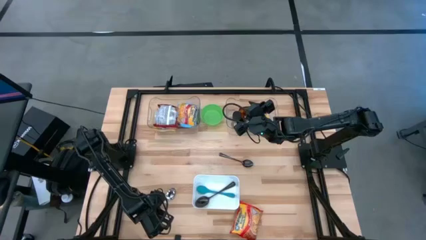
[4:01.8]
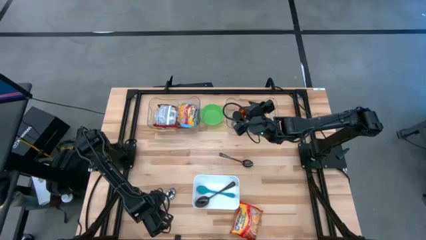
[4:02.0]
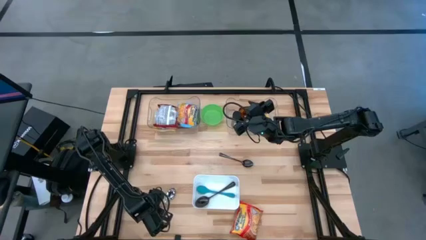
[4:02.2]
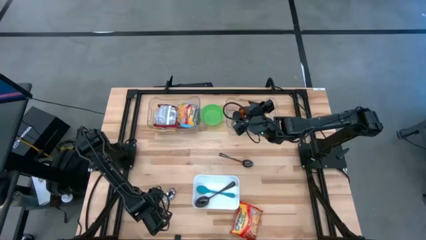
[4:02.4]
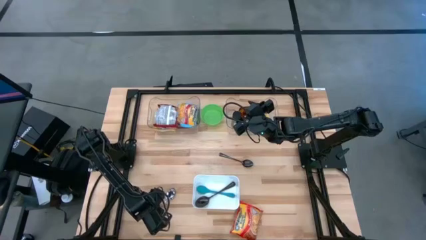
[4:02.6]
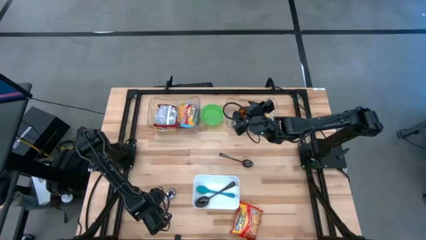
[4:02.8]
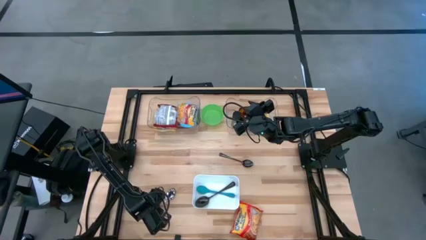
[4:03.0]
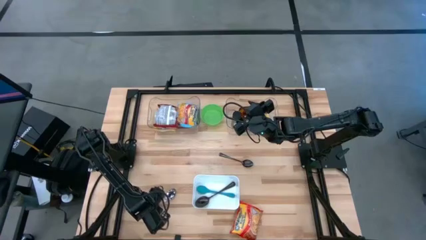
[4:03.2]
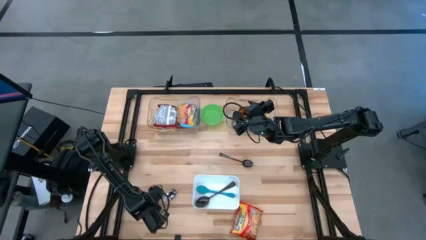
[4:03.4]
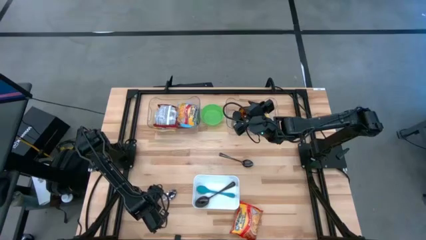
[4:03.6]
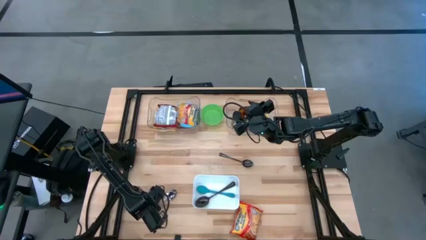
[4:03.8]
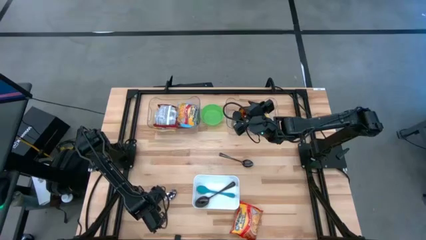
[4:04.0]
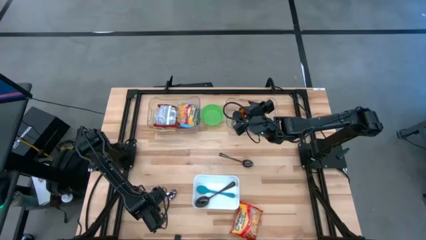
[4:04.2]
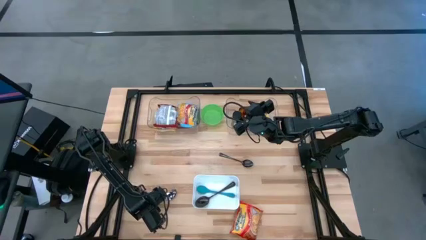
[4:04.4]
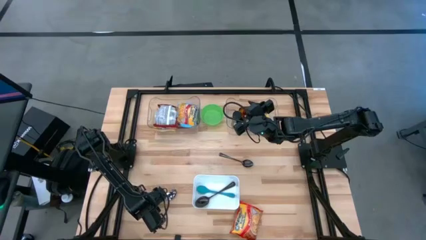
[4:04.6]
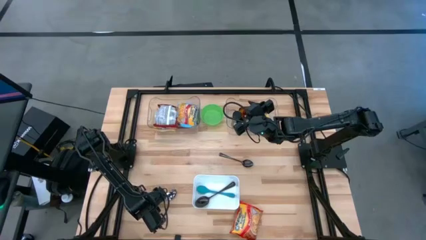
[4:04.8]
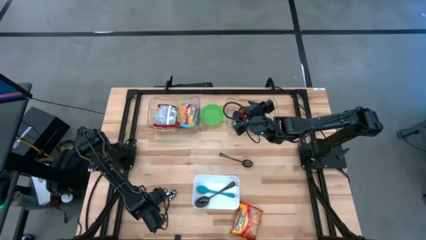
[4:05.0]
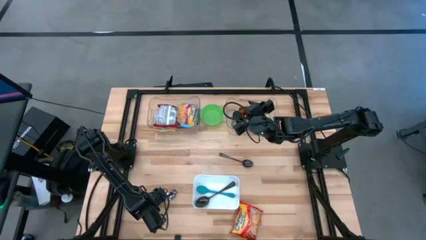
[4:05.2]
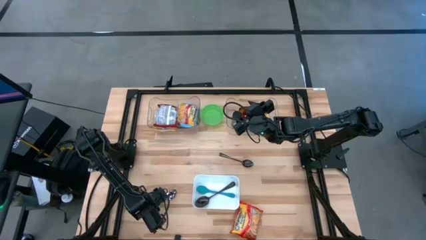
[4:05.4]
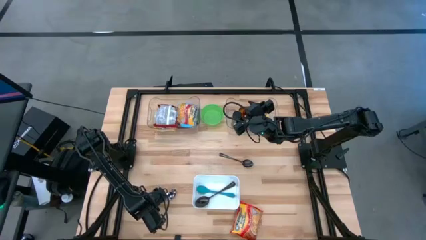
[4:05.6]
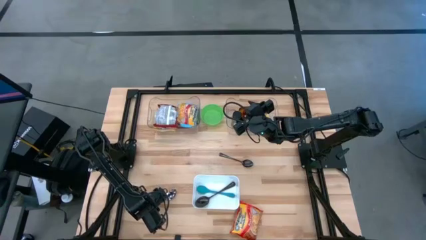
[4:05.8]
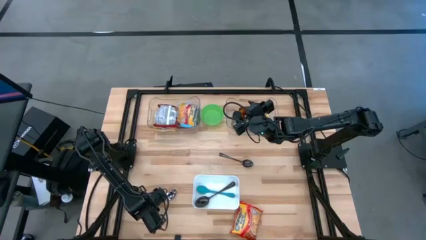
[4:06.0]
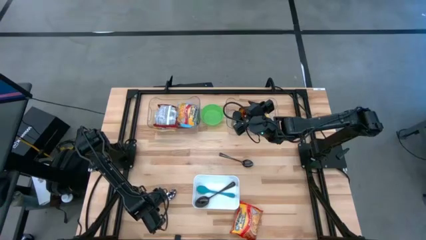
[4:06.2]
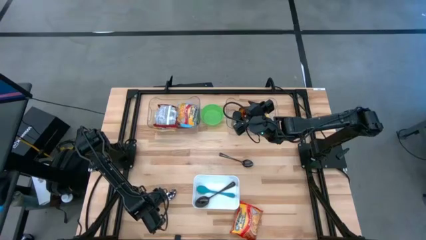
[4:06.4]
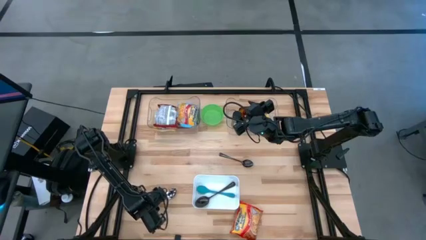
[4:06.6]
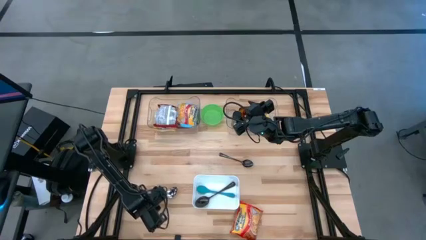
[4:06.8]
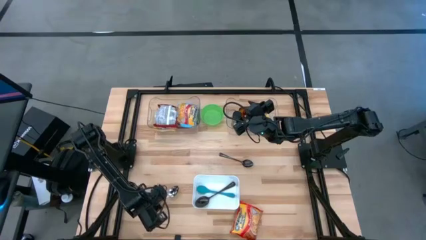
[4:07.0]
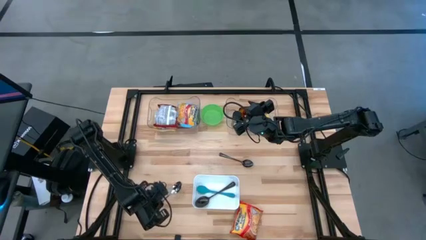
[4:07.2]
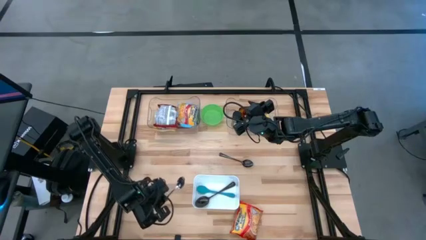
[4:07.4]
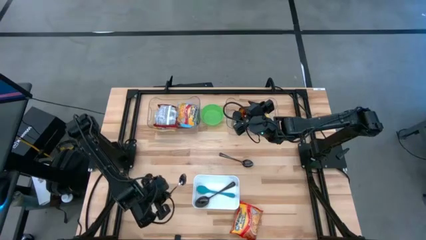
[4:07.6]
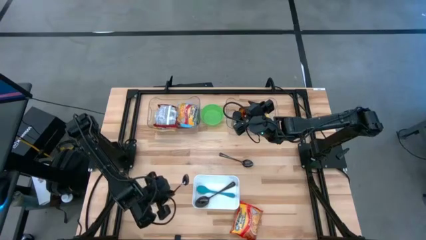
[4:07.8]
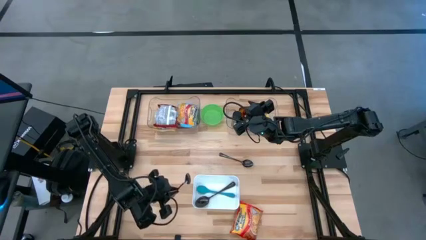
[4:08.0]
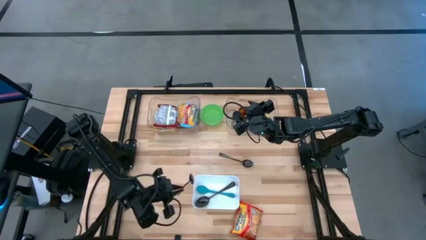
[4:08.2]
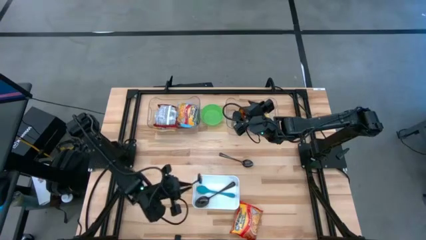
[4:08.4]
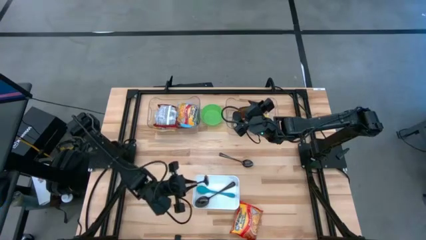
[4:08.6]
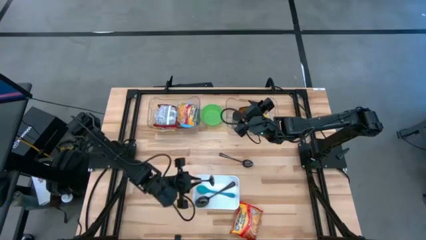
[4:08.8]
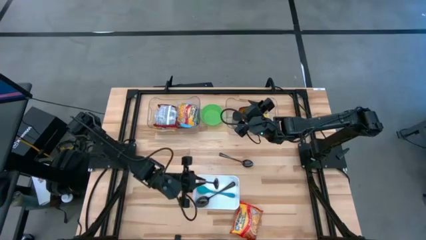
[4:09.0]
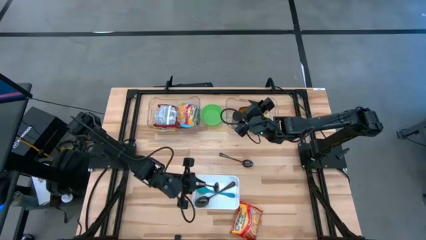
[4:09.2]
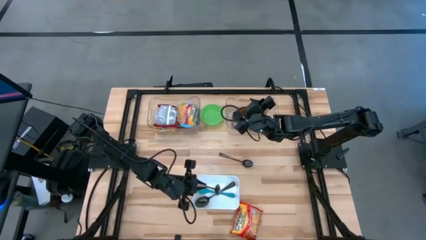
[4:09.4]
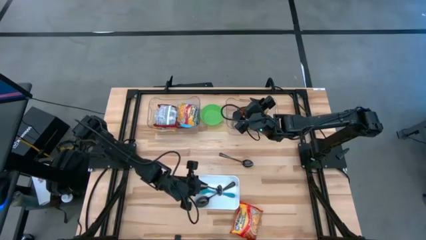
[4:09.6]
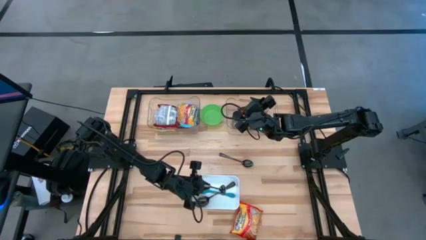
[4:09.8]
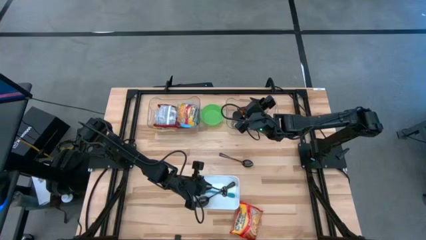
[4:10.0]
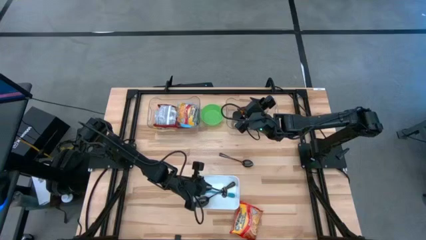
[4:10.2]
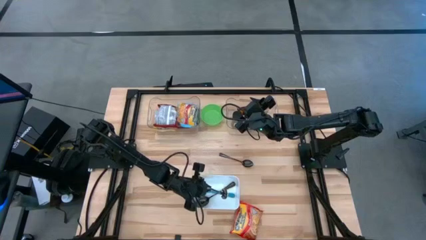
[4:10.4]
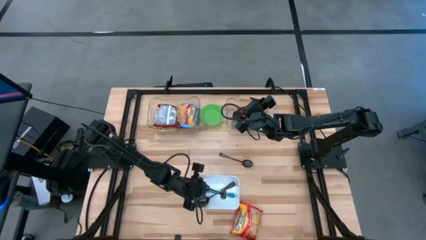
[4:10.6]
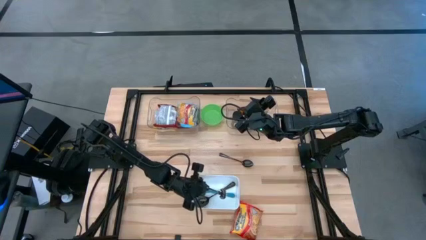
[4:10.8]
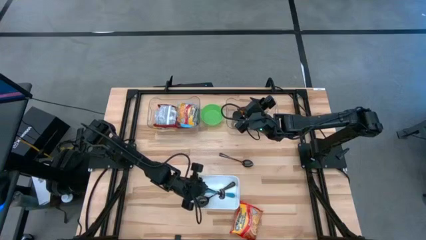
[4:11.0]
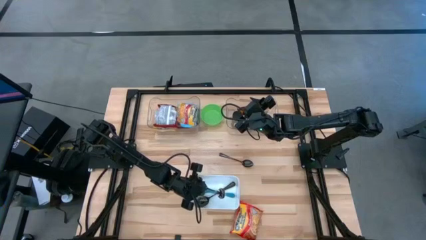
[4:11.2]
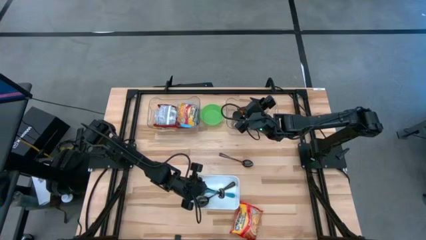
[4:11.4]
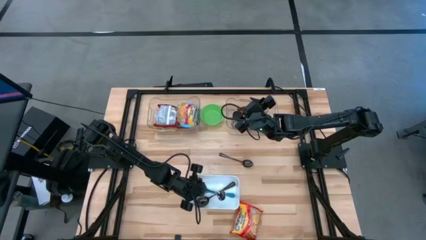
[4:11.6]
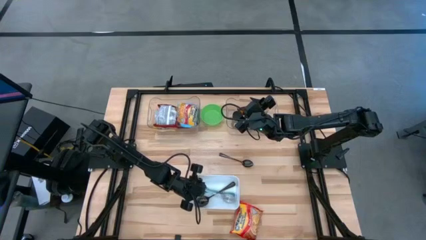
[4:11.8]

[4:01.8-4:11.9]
Task: Pick & Place Food Item
Put the silver spoon into the white bin

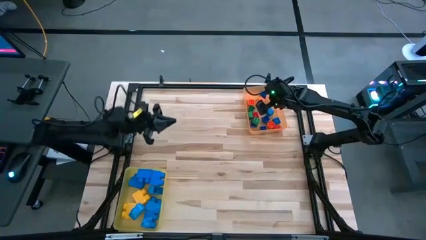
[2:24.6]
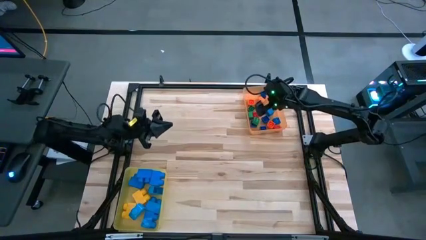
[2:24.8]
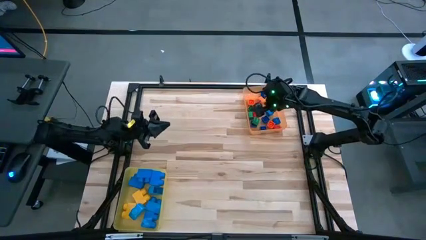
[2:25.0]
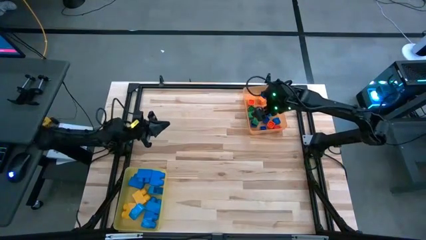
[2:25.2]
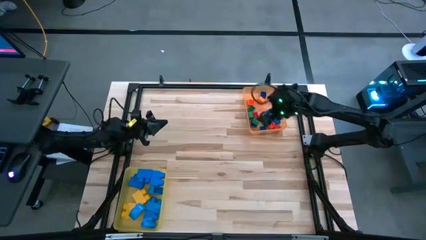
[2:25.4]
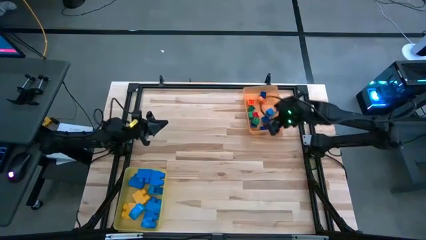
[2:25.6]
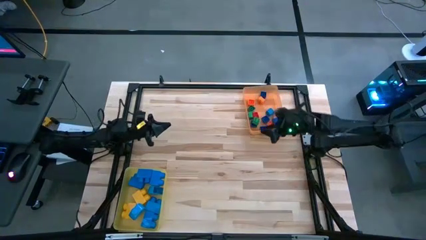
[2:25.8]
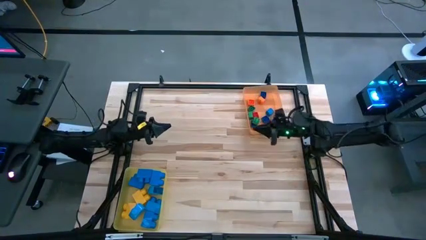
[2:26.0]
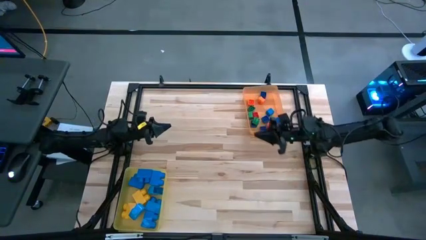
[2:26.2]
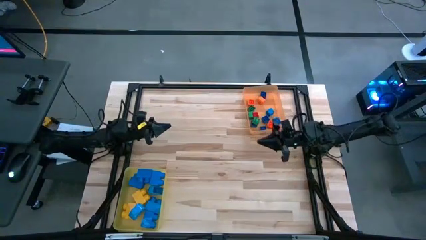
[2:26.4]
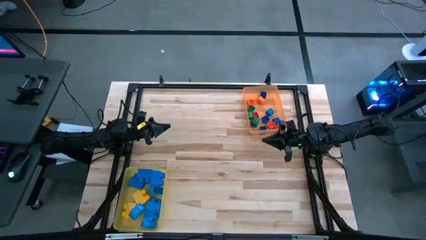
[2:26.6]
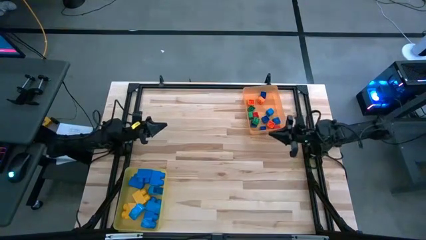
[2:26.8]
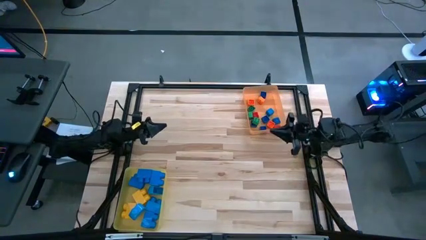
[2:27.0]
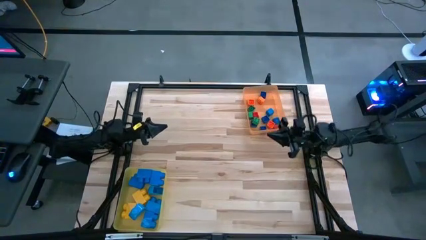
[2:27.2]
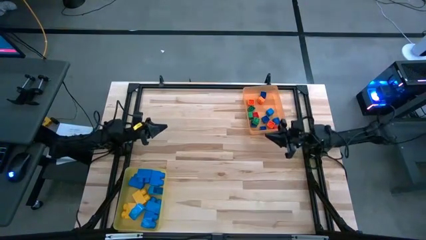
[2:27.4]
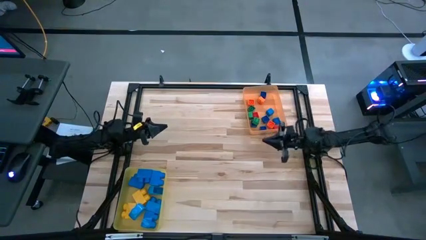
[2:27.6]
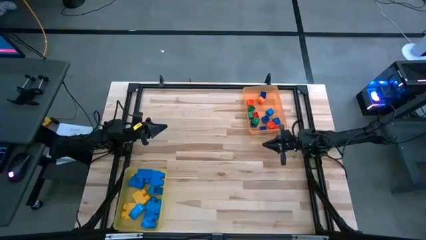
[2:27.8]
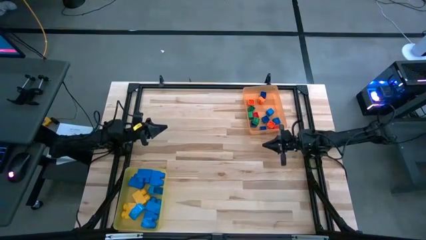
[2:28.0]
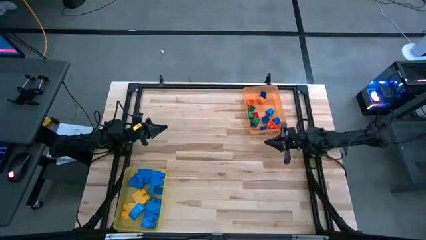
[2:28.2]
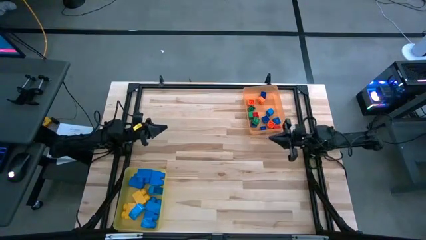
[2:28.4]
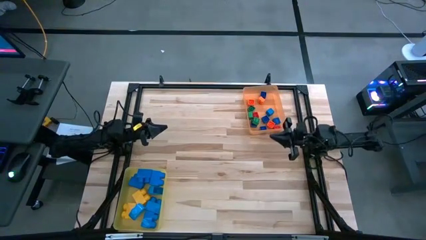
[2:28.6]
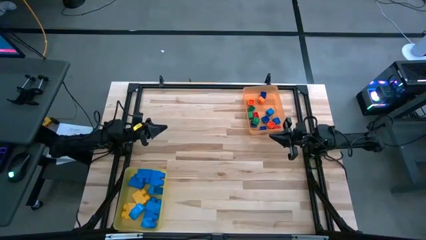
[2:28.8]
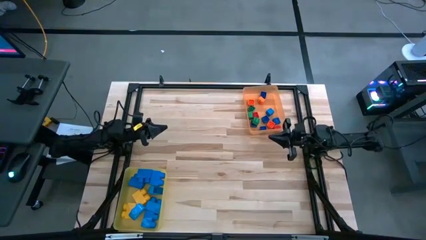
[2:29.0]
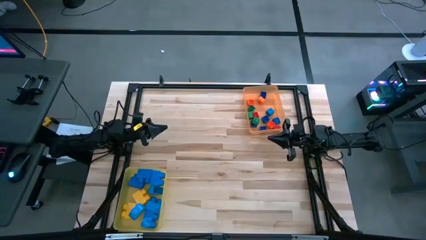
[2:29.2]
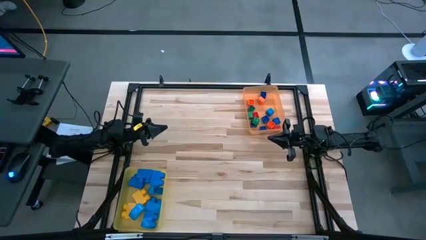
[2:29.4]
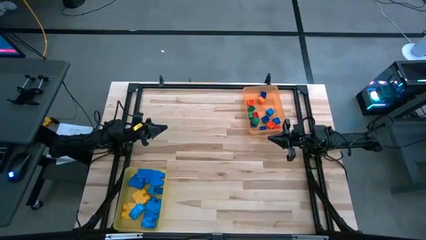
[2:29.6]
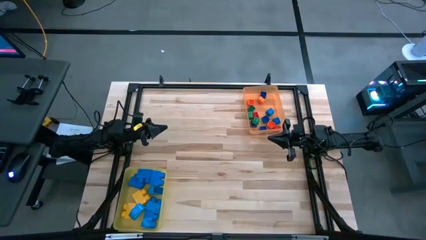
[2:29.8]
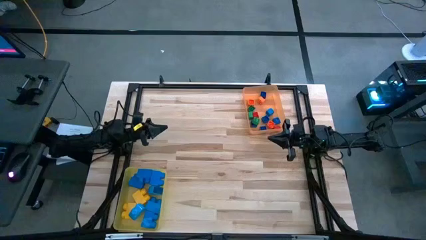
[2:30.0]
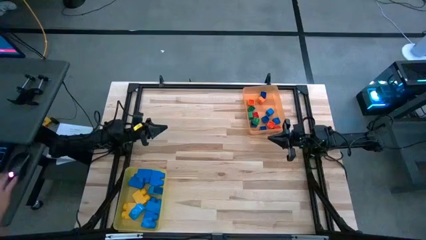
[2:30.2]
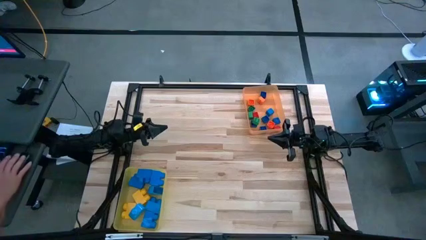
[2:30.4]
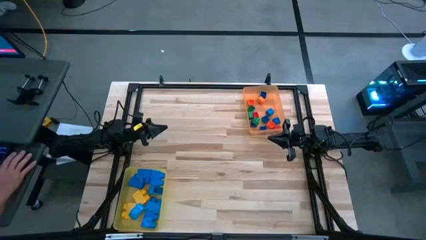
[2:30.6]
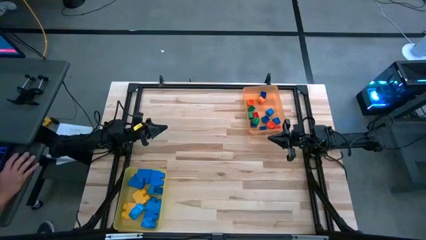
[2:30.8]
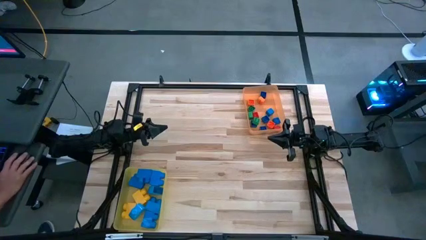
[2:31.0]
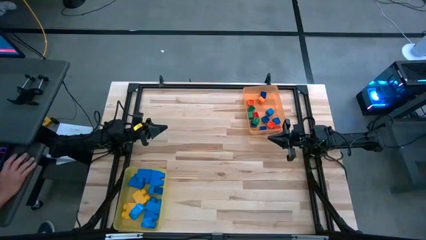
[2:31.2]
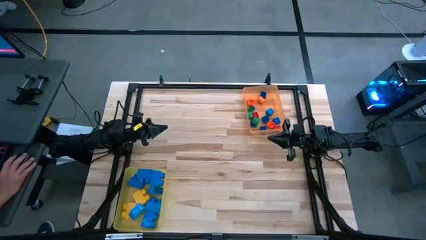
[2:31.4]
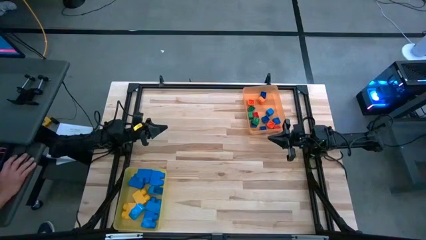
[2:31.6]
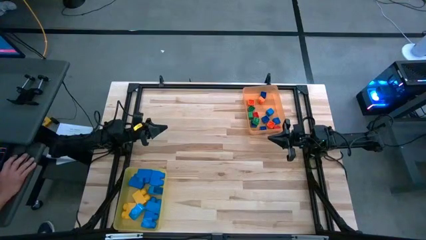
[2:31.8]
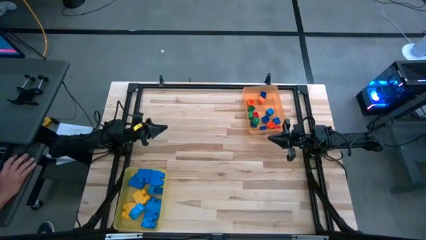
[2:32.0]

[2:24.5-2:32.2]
Task: Sort blocks by size
Return to Home Position
